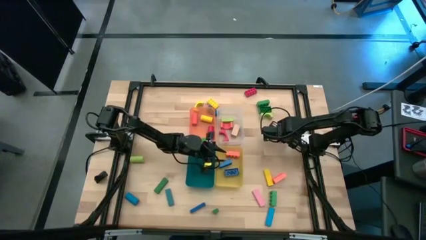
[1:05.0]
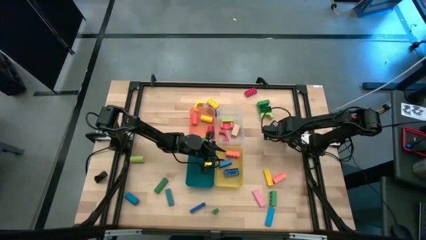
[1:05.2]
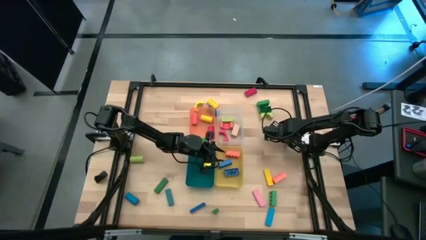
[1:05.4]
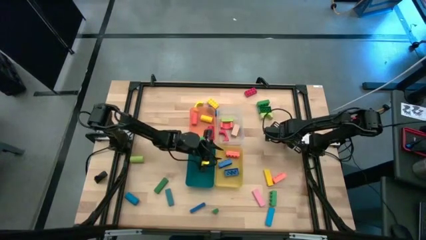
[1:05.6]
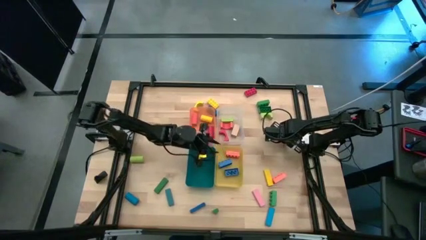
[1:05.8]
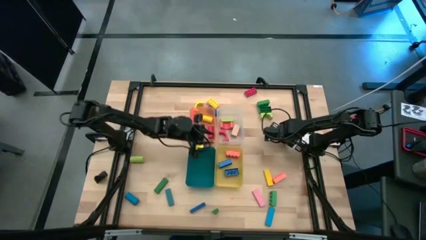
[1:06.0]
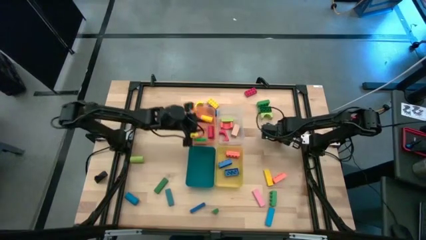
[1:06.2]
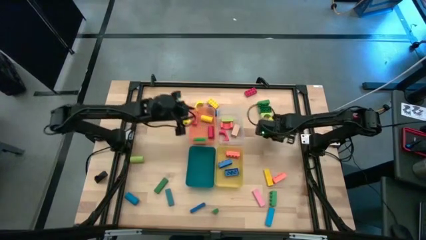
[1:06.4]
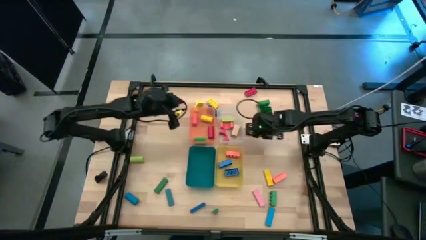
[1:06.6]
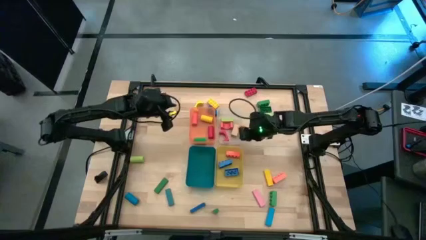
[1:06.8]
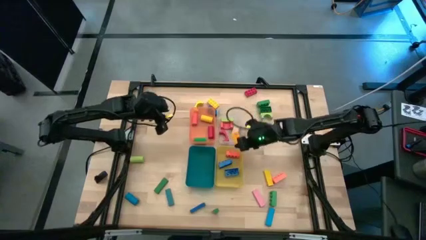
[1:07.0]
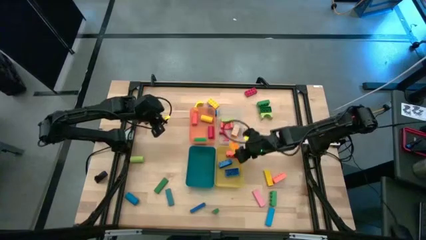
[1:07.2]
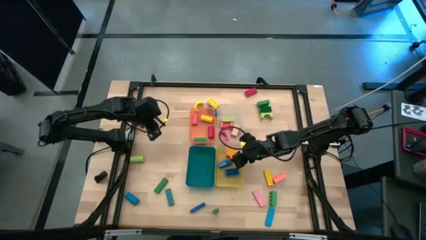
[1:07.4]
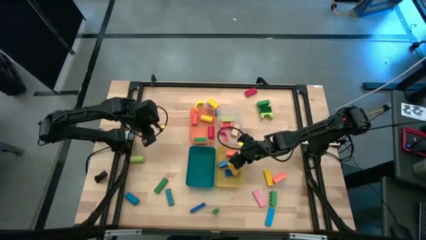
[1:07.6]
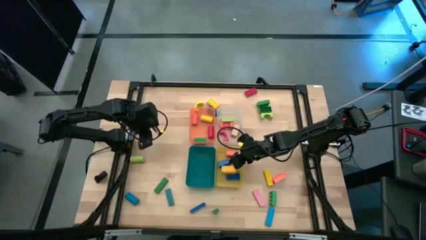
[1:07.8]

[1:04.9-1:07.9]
Task: Sort blocks by size
Put the bottom yellow game piece into the orange bin

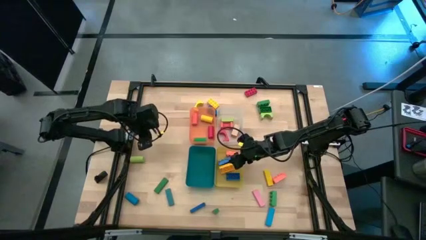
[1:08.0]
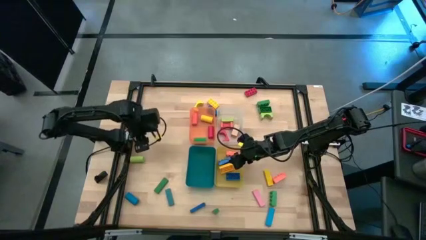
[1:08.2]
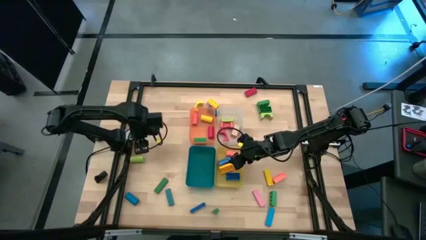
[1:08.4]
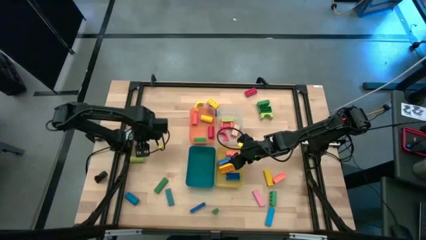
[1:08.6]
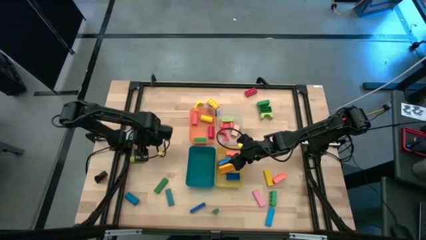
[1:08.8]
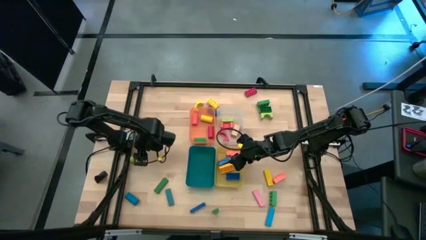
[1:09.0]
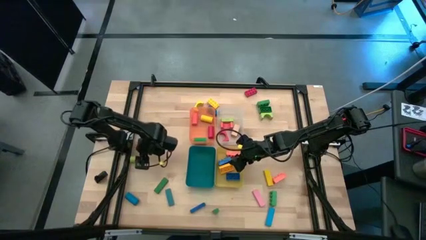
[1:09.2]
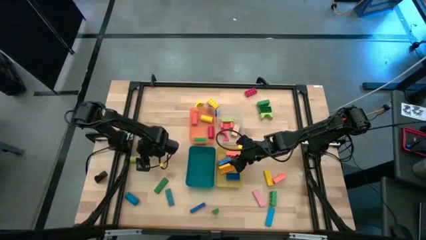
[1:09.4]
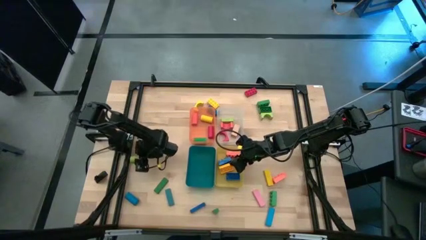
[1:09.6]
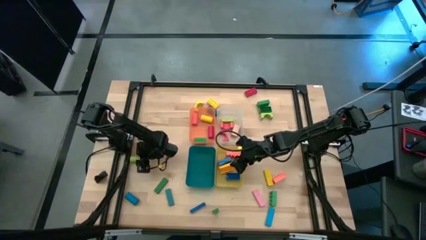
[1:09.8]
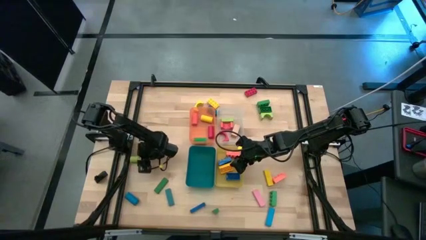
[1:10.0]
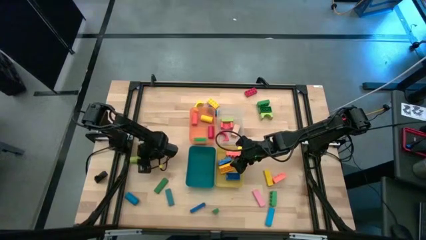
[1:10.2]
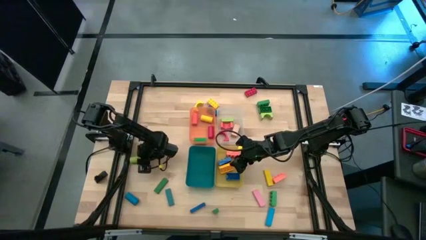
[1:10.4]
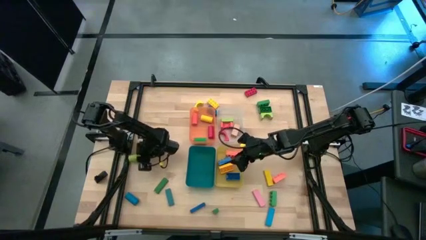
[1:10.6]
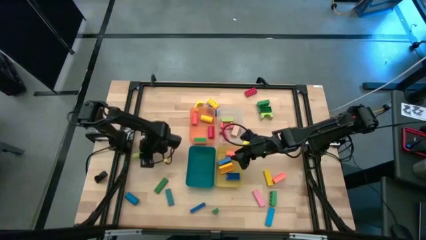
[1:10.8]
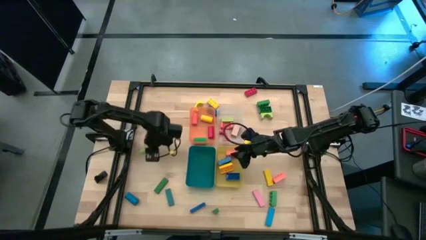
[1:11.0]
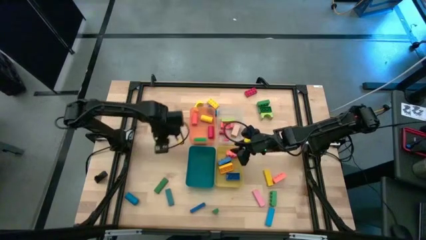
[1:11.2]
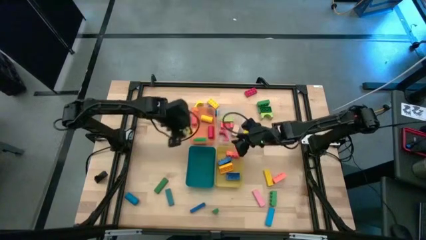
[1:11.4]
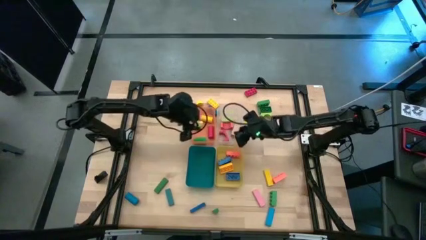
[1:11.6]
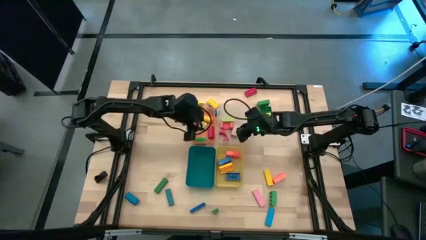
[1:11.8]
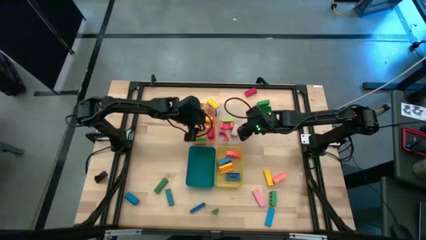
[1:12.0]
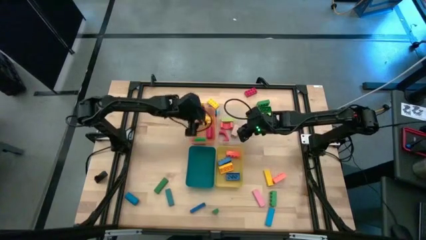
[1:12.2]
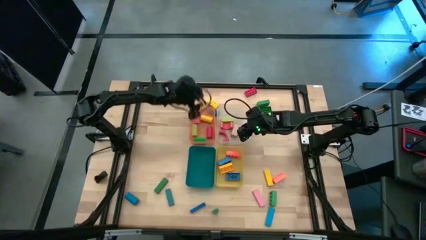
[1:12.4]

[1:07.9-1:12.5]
Put the light green cylindrical block into the orange bin

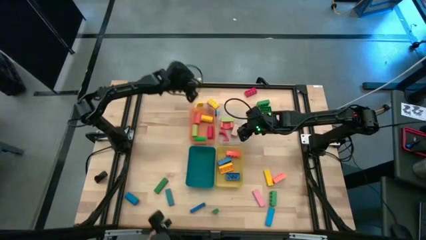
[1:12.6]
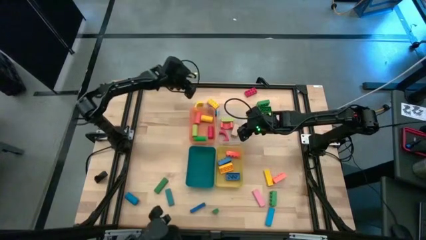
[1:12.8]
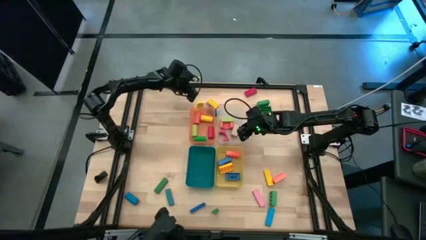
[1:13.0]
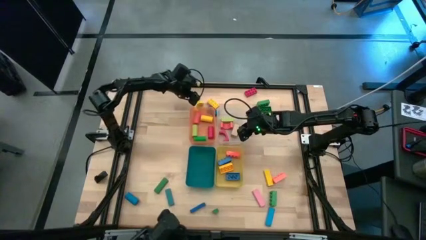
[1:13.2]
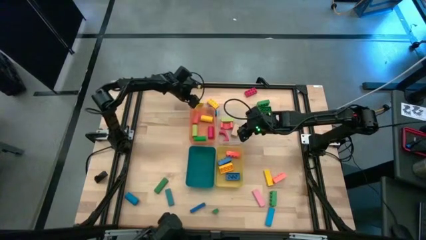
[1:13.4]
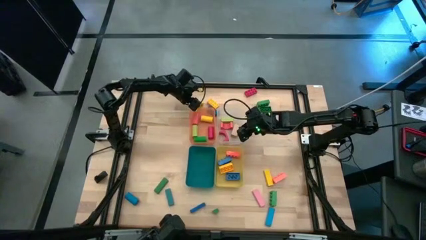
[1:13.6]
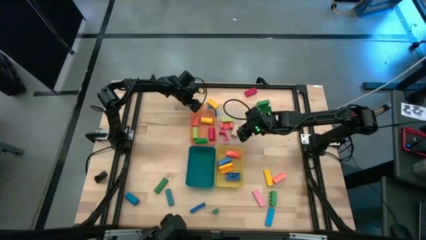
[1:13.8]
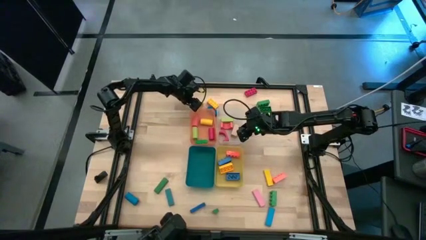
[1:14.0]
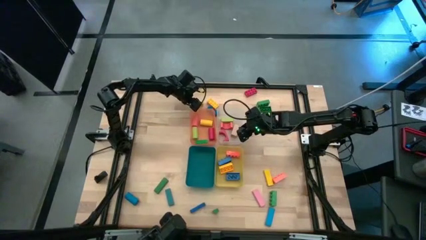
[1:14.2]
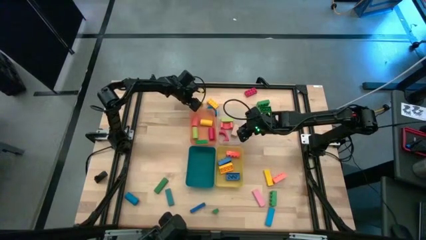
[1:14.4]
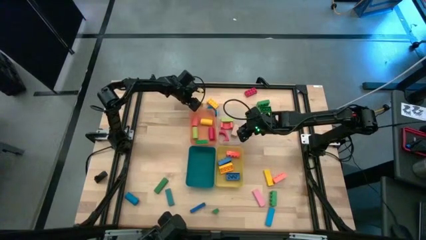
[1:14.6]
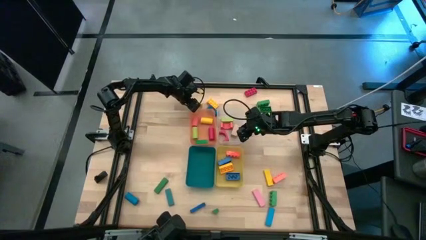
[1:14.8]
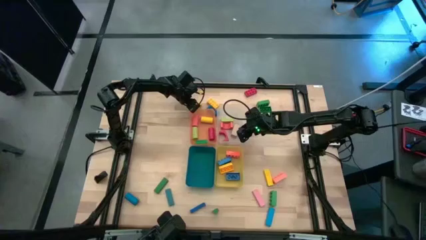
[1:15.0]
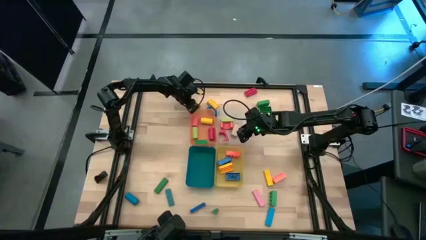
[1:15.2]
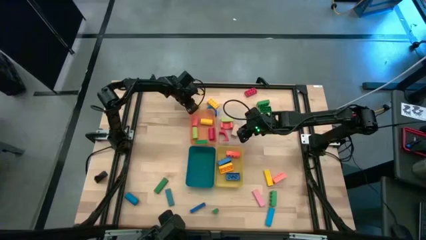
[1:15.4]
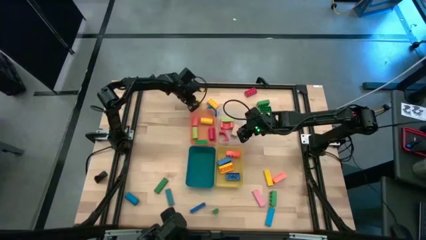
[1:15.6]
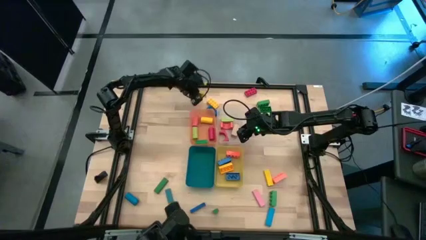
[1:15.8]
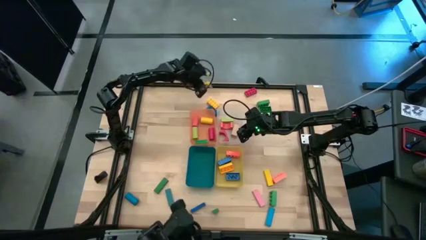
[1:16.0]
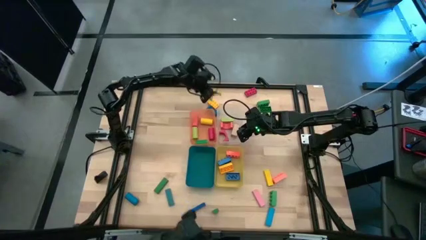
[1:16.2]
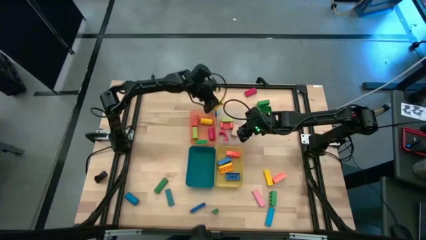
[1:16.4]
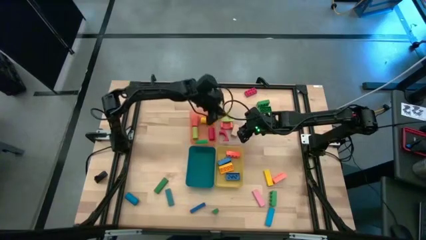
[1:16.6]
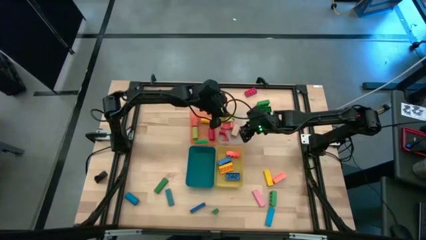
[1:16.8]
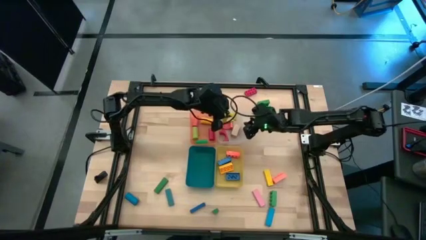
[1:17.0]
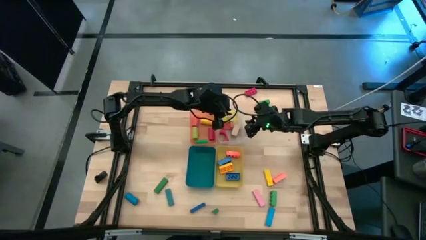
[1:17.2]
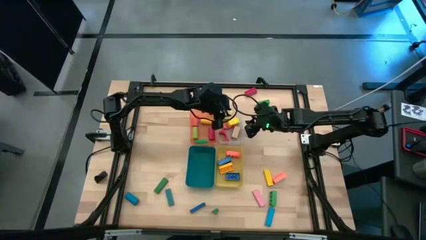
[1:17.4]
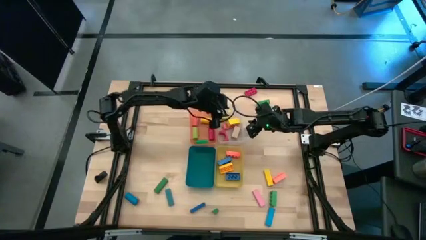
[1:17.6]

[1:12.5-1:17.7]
Put the yellow arch block into the transparent bin

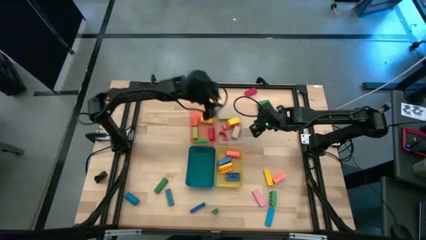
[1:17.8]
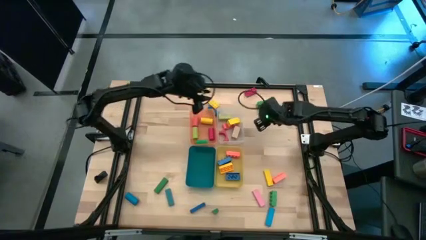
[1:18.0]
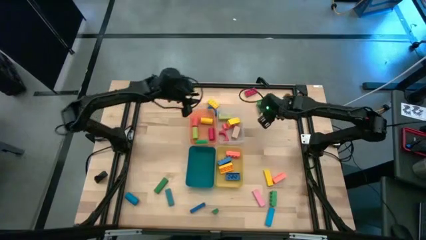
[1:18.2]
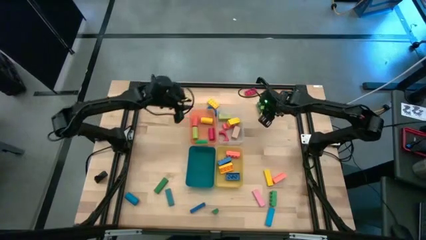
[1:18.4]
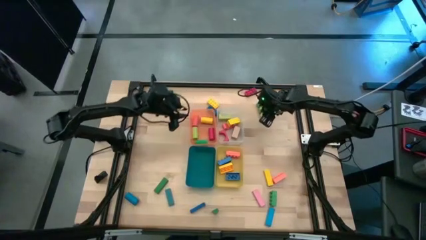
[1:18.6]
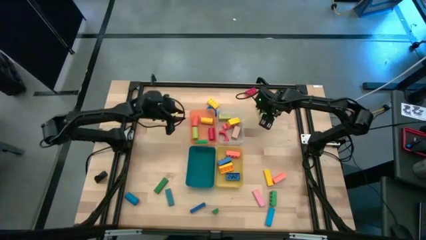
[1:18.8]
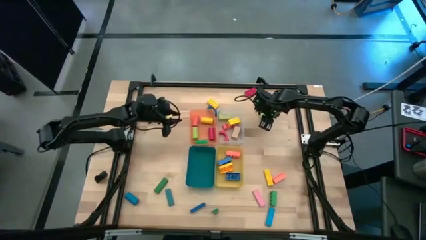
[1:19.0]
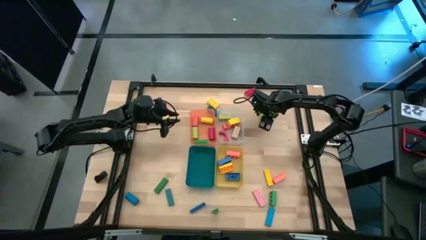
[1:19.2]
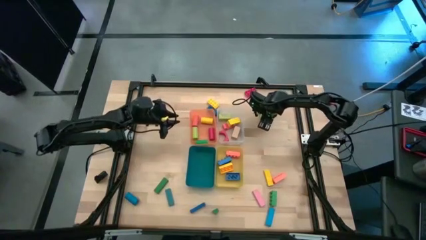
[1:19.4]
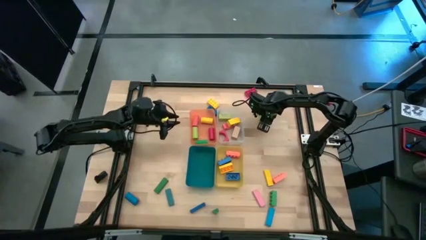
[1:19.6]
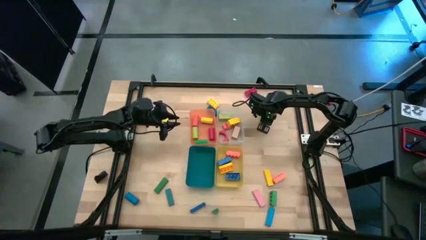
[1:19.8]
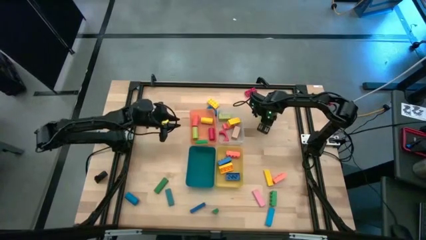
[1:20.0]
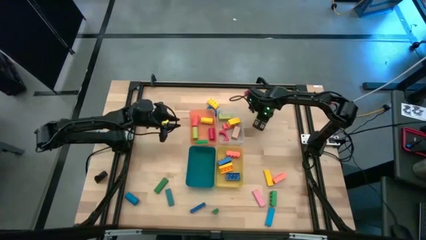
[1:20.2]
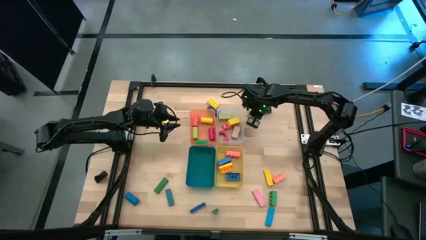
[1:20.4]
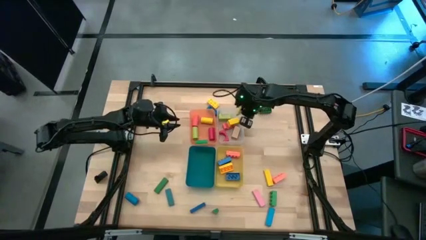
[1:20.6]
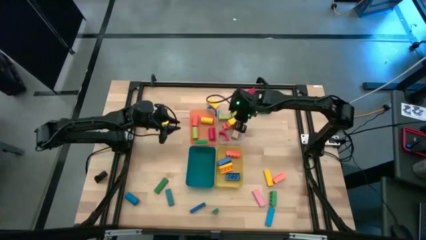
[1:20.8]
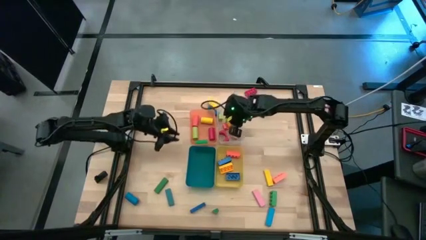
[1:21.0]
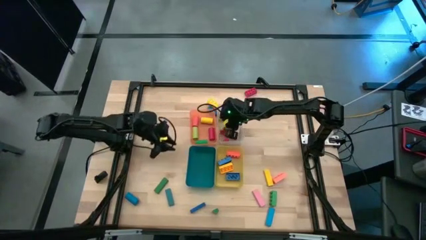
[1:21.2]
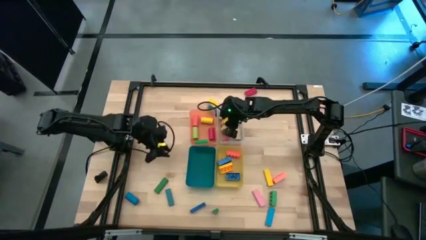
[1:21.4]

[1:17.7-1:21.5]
Put the light green arch block into the transparent bin
